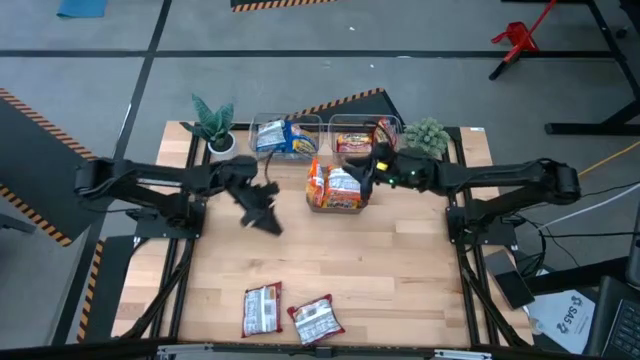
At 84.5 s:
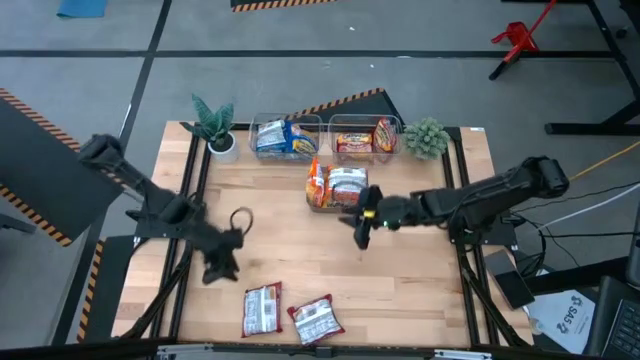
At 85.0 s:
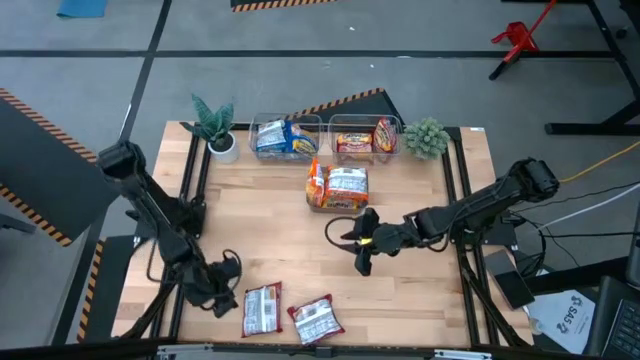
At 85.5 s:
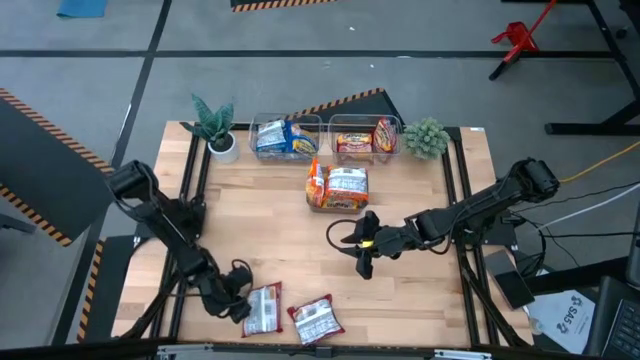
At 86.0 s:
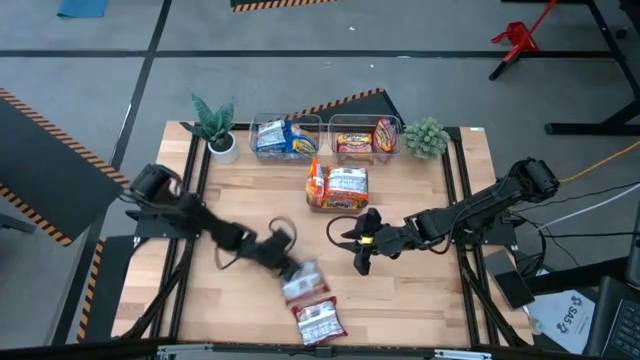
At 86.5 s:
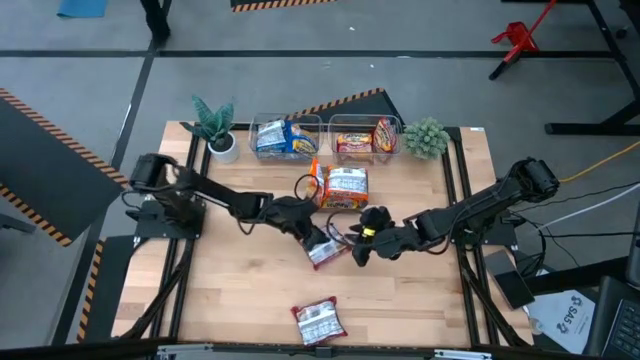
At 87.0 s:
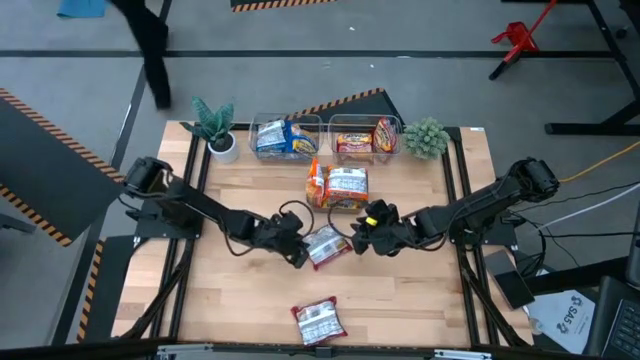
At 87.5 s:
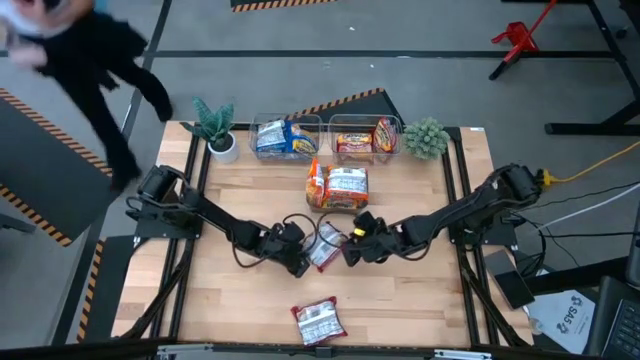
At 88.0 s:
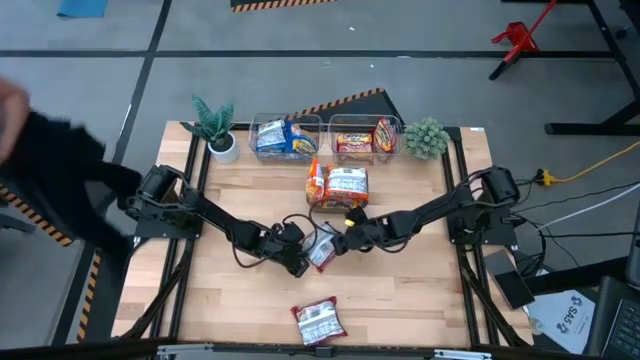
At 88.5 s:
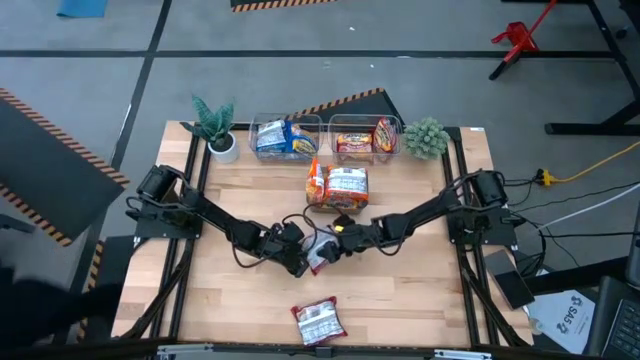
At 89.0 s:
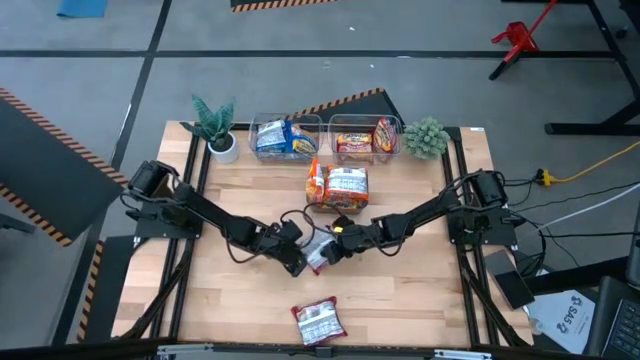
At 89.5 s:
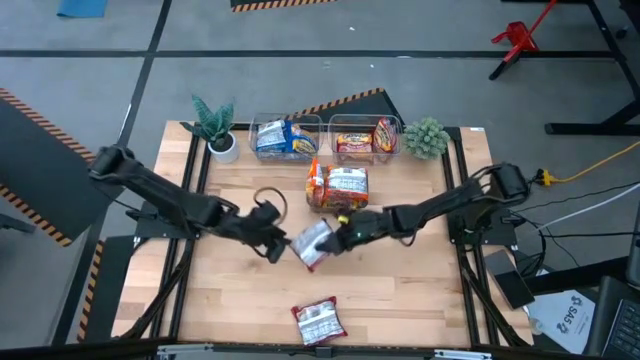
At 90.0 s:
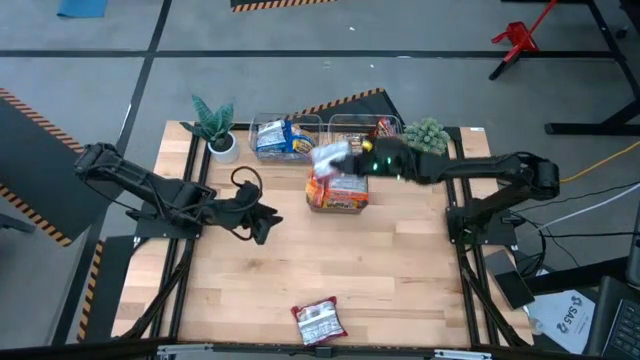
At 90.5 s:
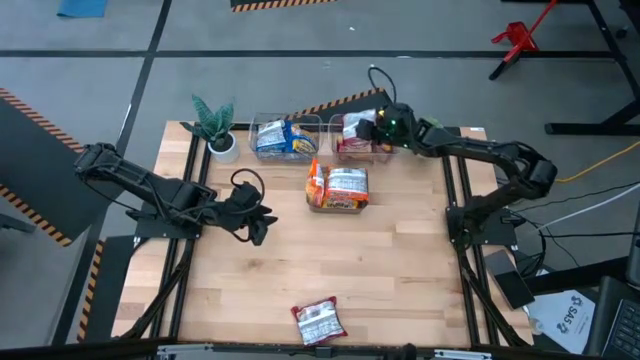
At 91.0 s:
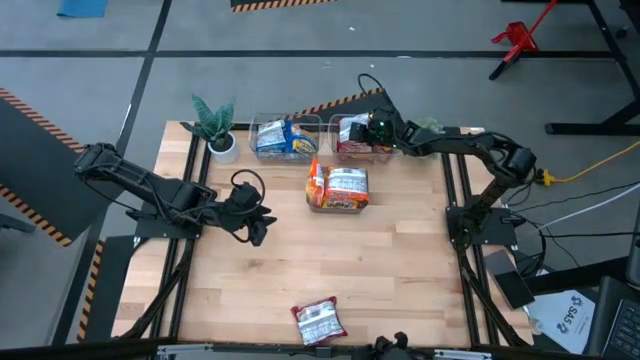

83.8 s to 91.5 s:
Task: Sort Maruchan noodles
Put the red noodle pack into the right transparent bin

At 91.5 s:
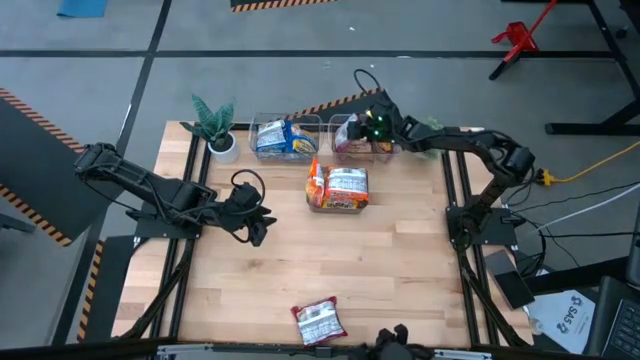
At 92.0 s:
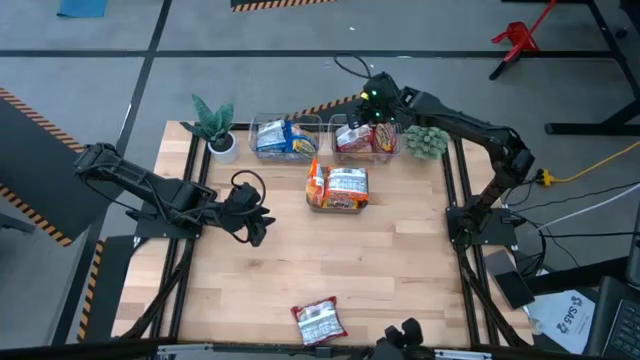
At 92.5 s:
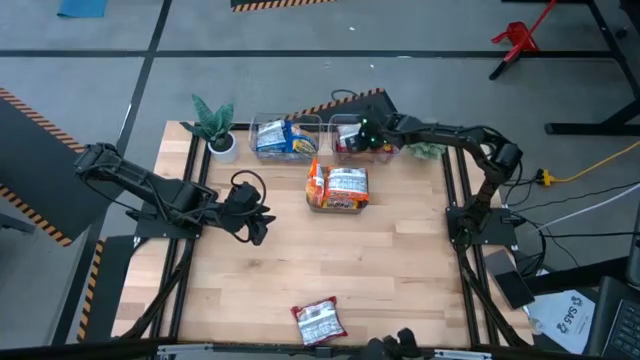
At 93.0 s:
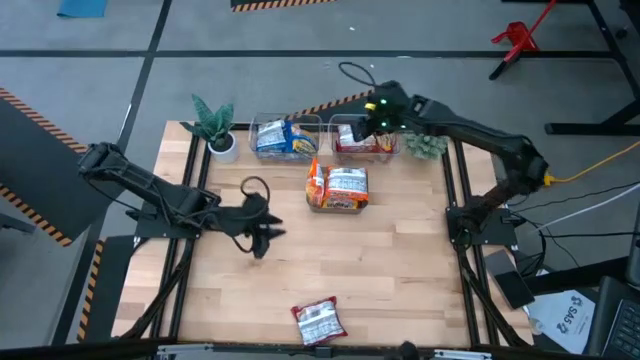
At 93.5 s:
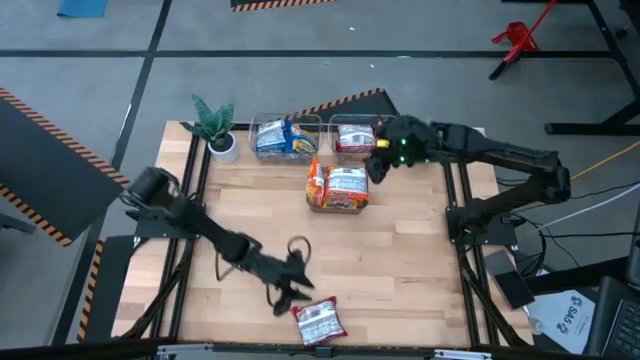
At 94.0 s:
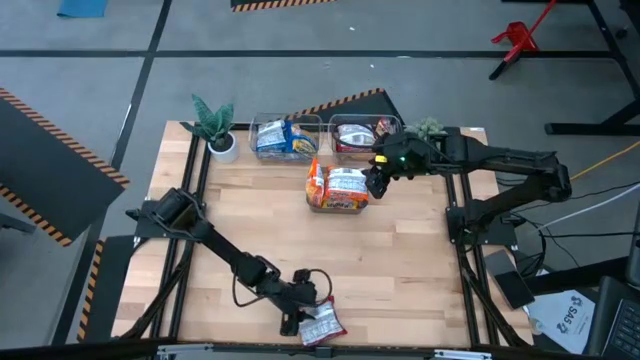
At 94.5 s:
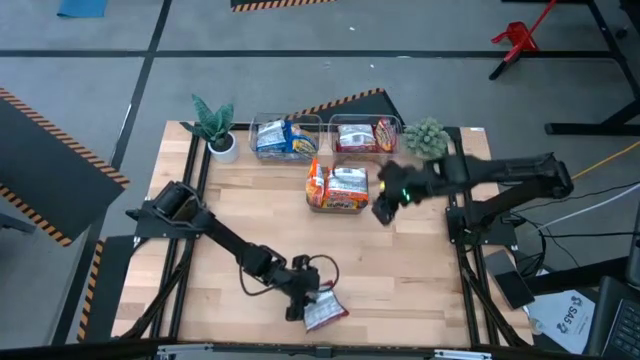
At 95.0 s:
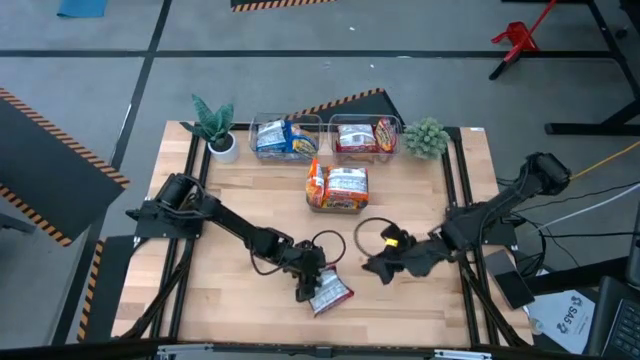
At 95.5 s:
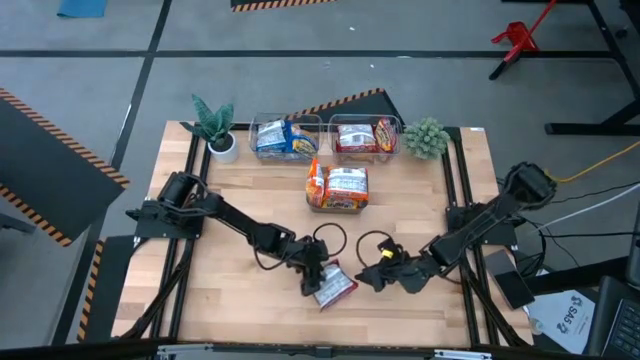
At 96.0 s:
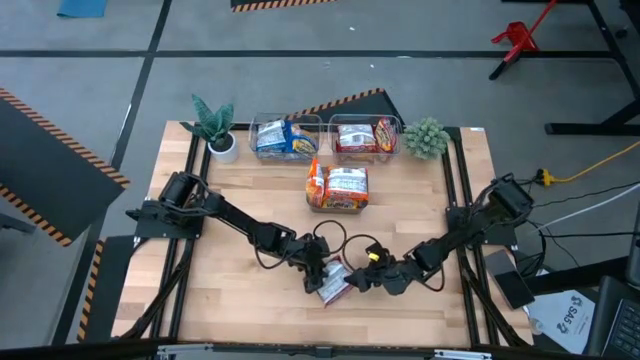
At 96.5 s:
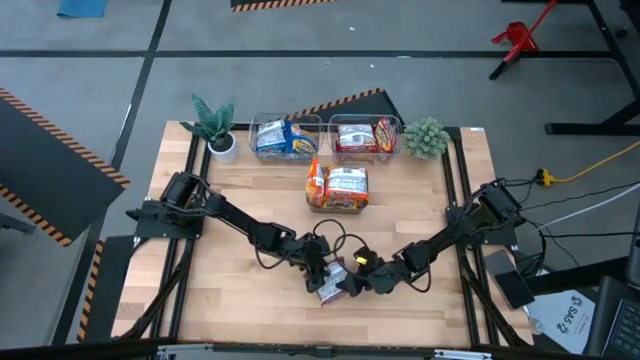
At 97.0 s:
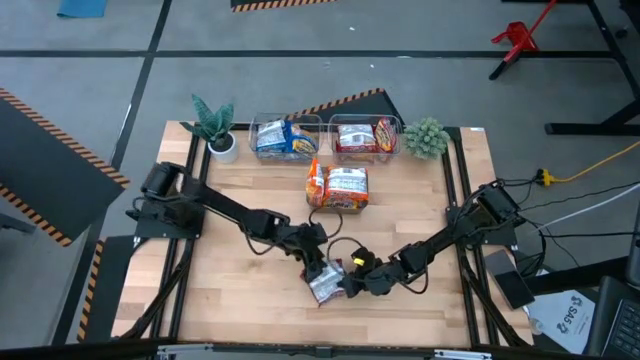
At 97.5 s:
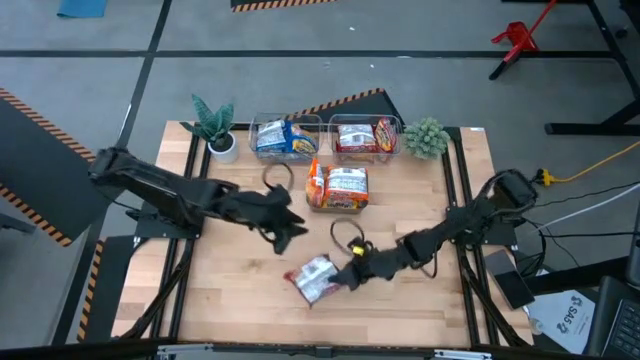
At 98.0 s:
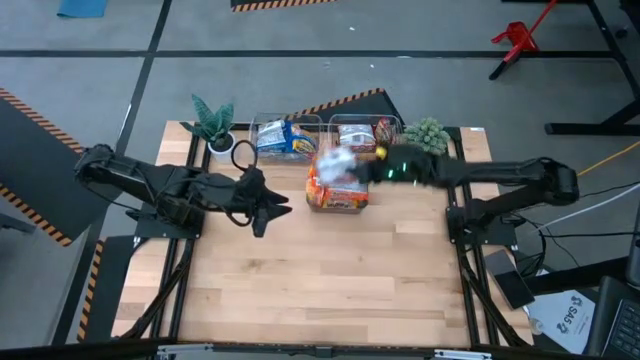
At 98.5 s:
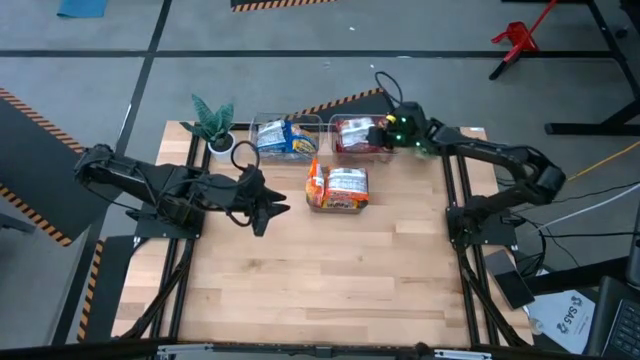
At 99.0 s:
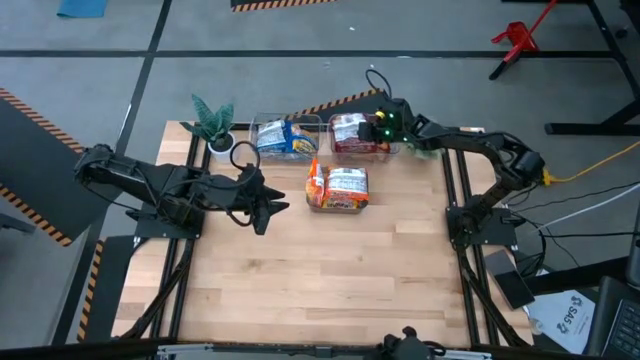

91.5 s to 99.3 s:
Put the red noodle pack into the right transparent bin

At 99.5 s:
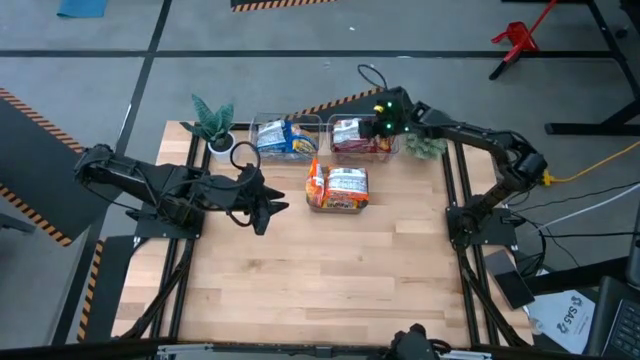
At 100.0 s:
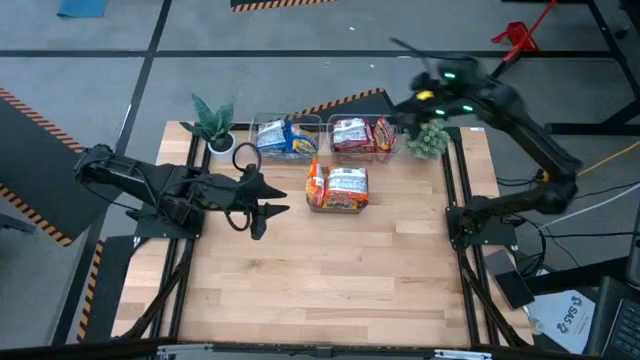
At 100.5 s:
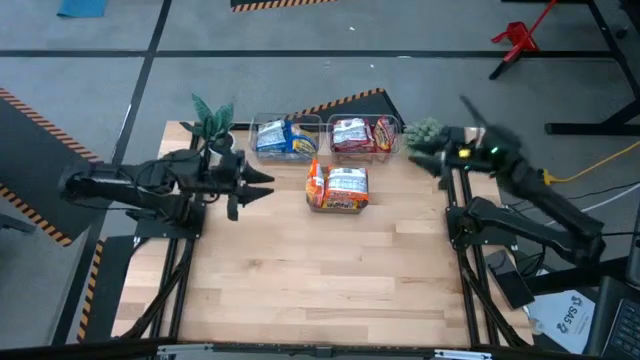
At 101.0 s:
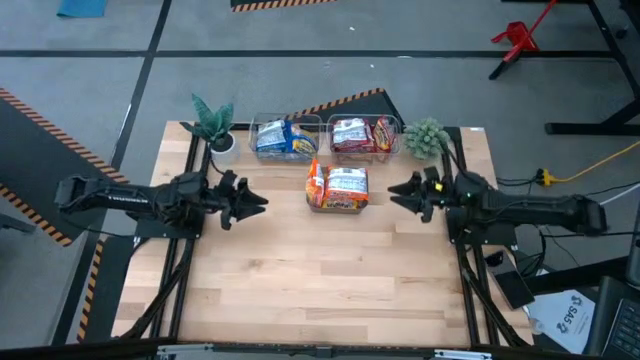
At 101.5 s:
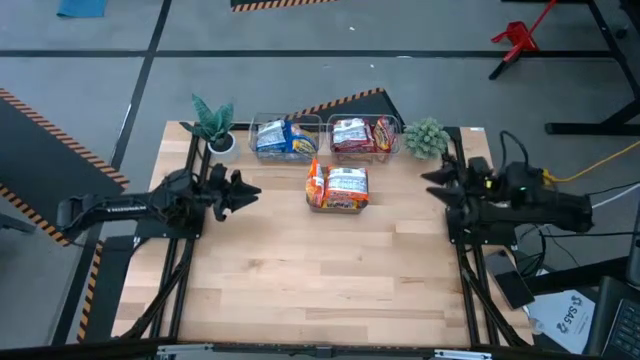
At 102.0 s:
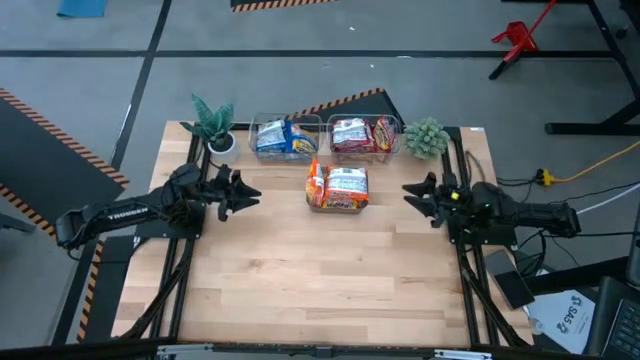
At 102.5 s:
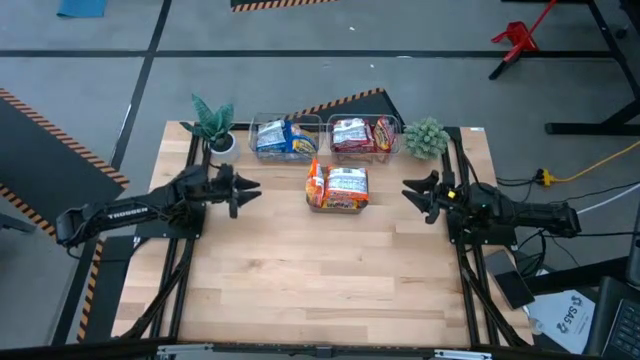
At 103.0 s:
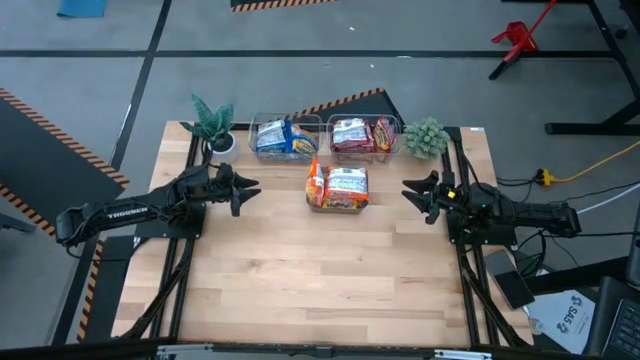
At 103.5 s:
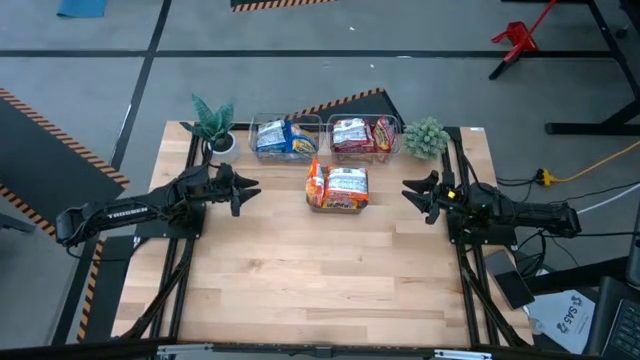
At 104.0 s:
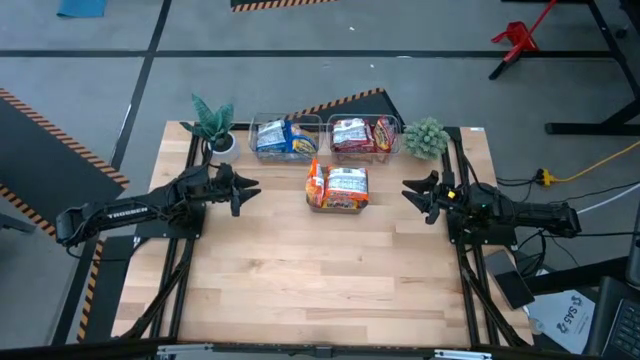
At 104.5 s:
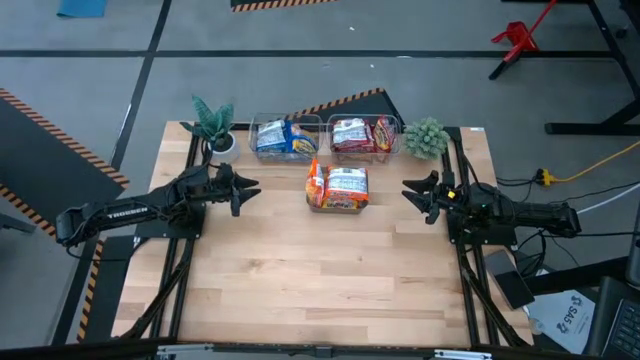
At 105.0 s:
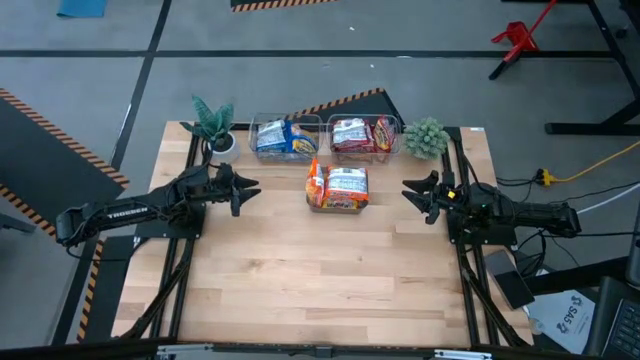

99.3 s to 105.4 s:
Return to Home Position
